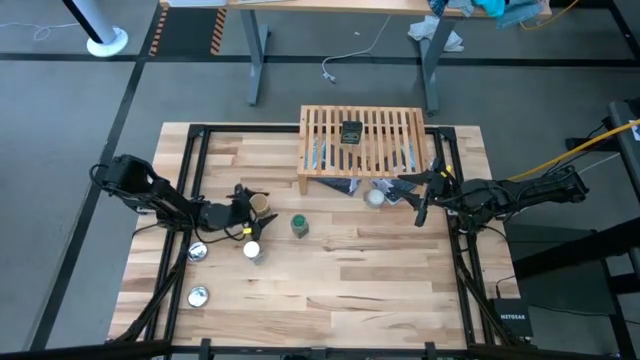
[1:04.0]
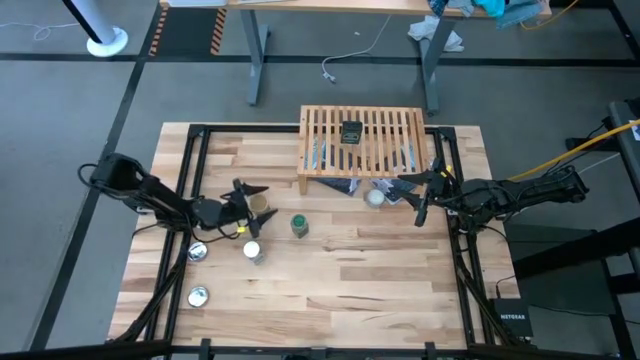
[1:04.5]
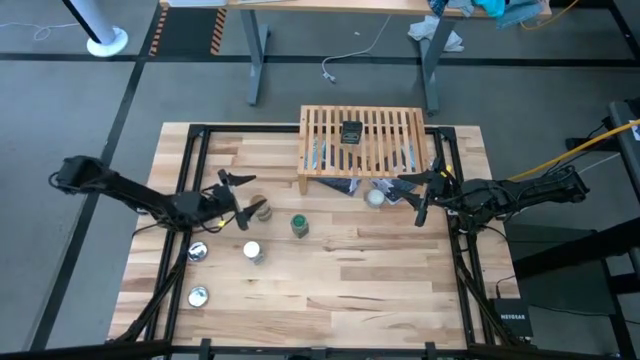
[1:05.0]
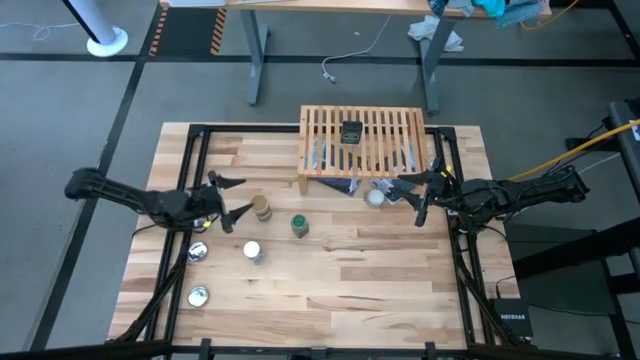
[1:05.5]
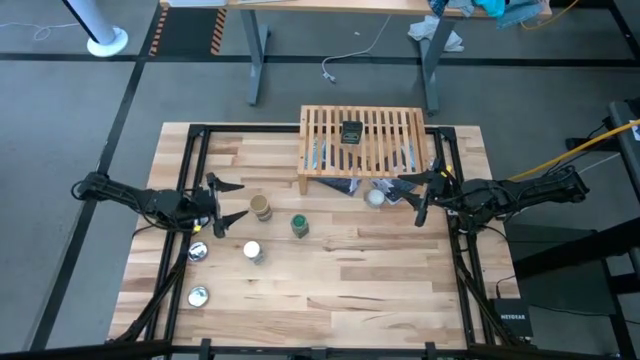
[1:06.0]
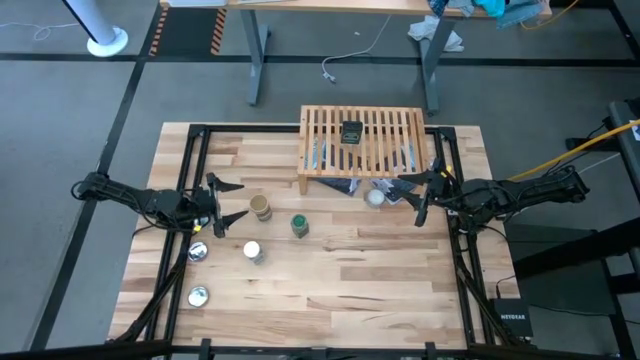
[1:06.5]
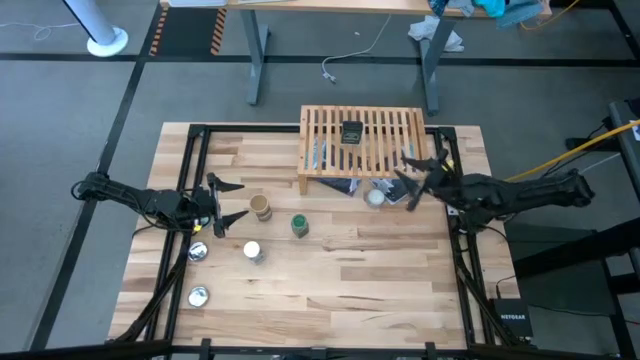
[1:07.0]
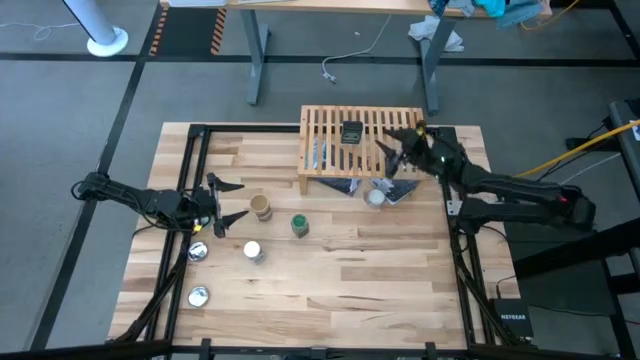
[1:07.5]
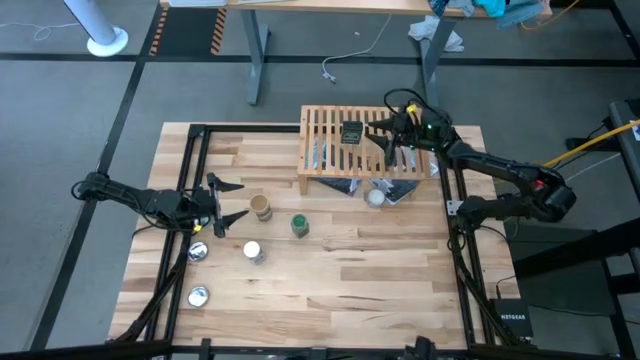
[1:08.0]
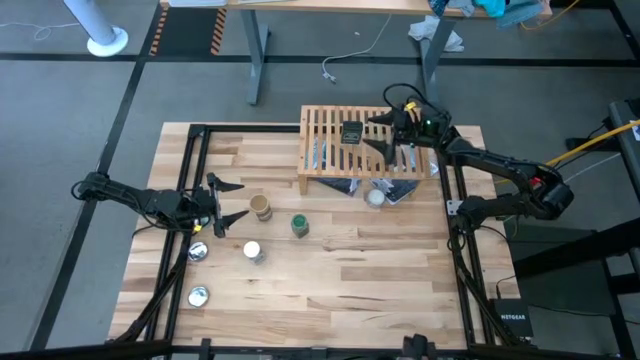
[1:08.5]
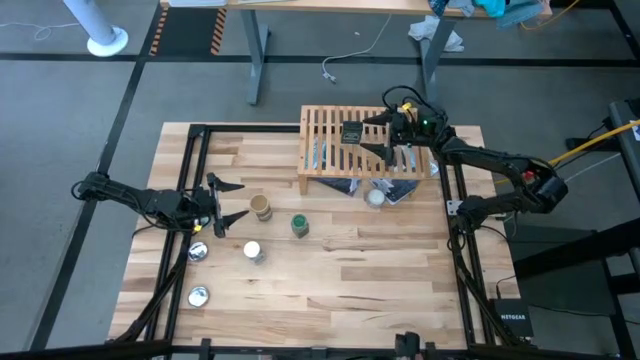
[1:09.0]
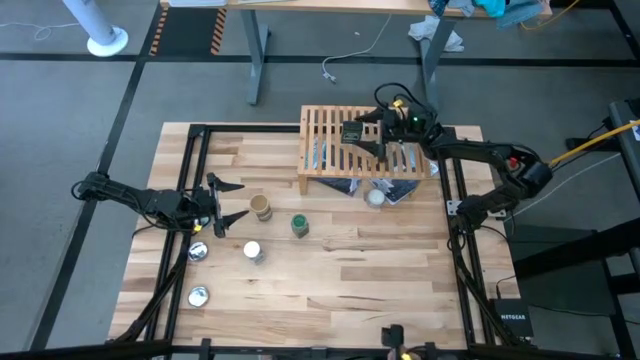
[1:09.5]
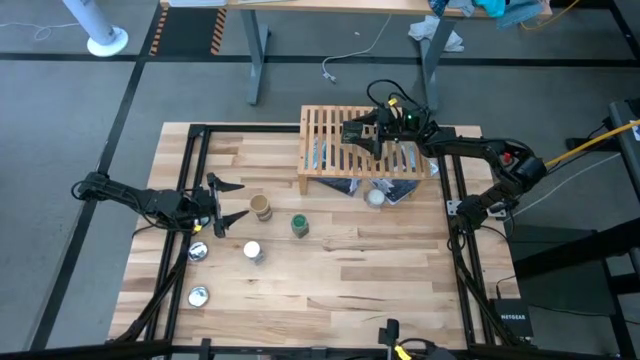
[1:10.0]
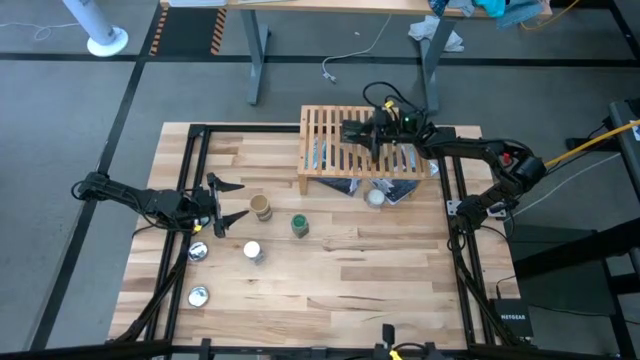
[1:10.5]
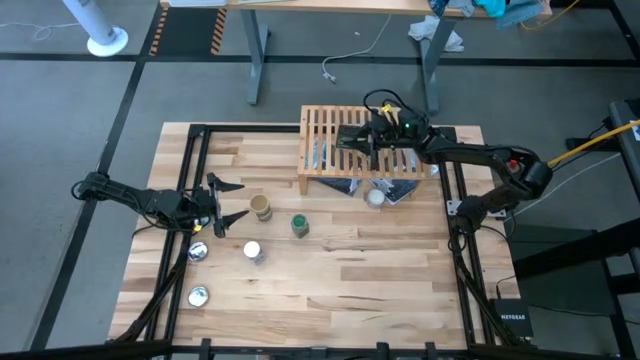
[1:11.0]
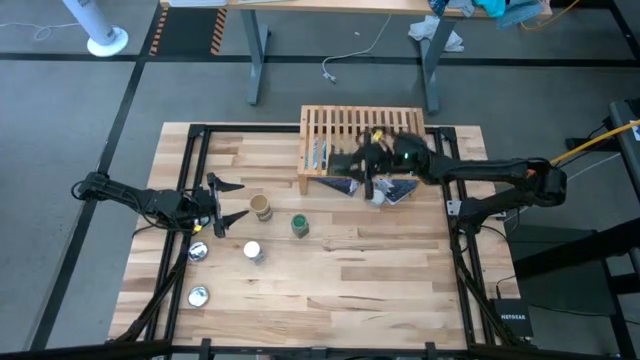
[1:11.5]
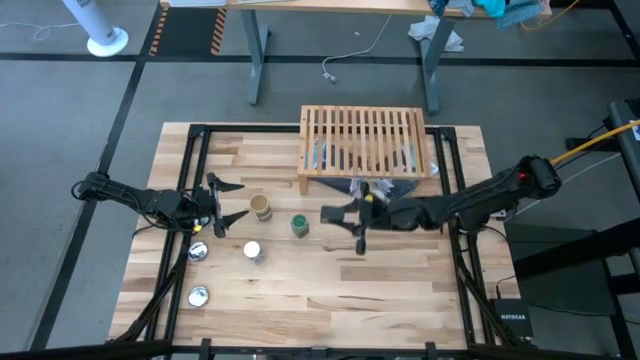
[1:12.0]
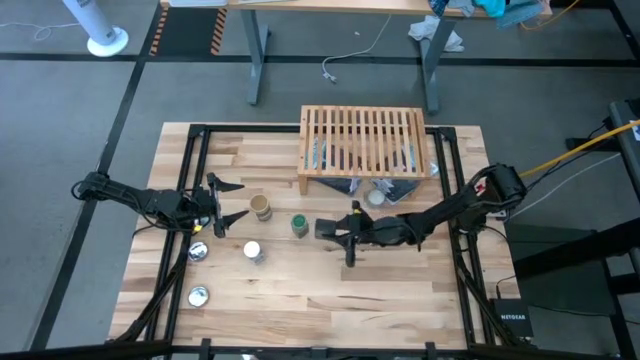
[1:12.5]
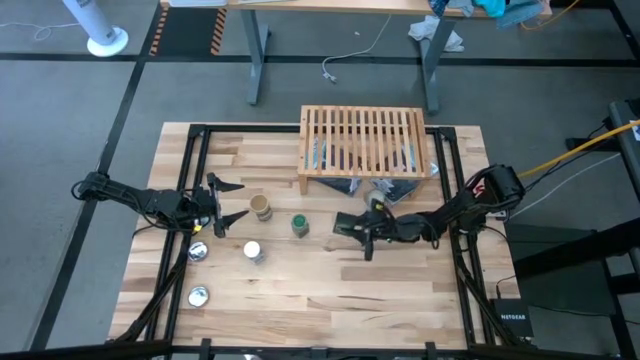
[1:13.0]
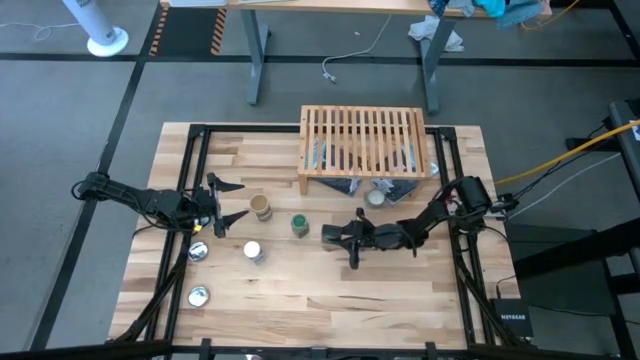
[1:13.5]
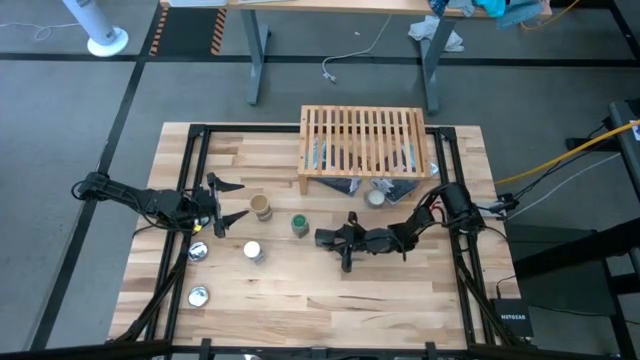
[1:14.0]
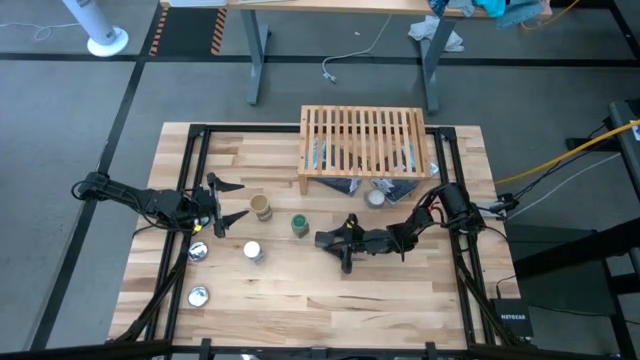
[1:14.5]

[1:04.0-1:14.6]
Task: Shelf spices
Remove the black seasoning can from the shelf

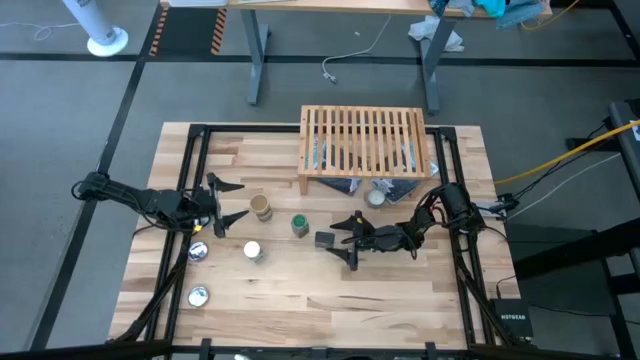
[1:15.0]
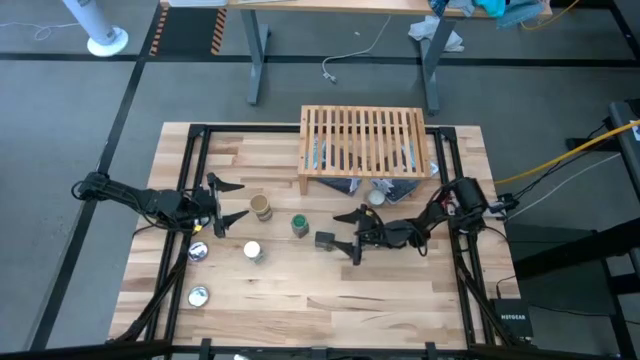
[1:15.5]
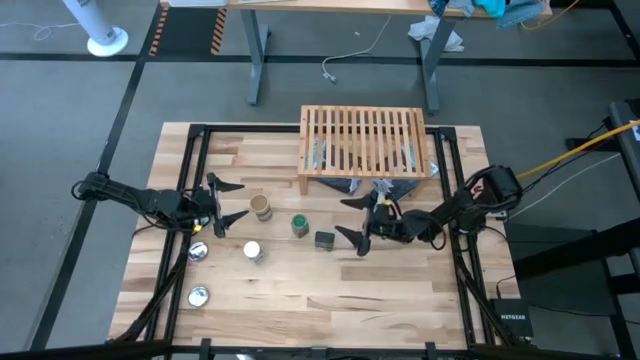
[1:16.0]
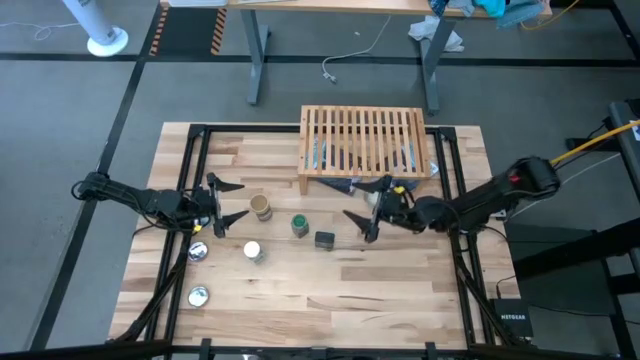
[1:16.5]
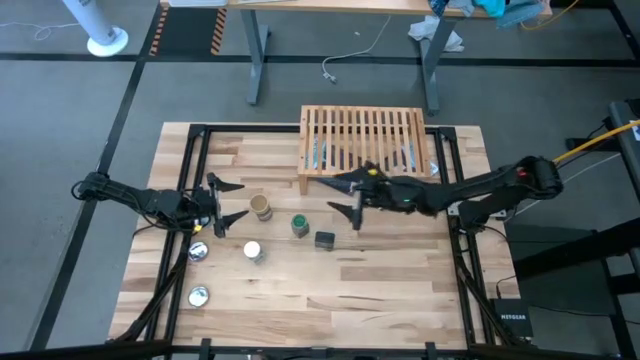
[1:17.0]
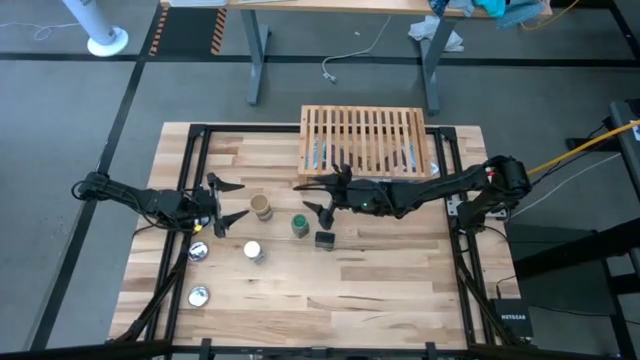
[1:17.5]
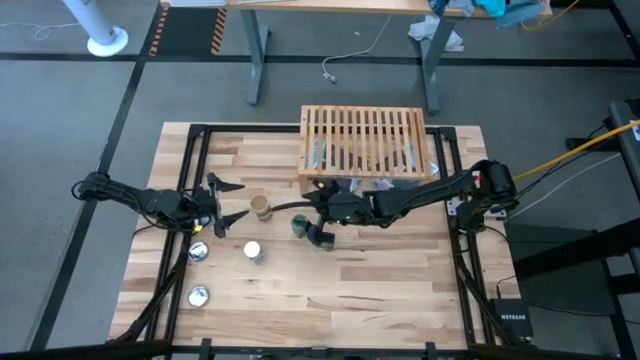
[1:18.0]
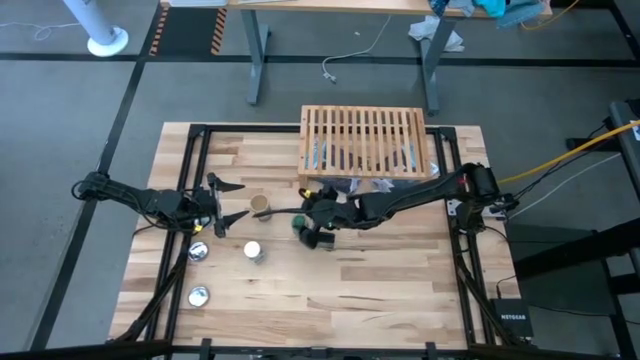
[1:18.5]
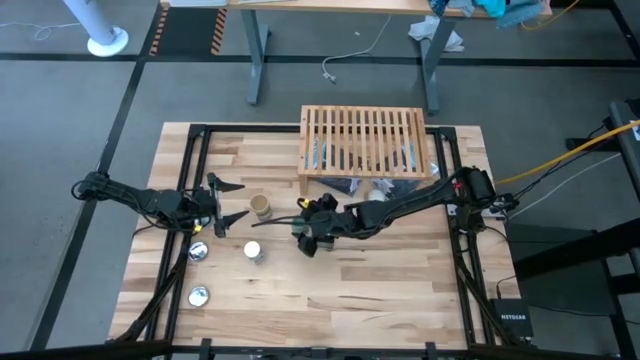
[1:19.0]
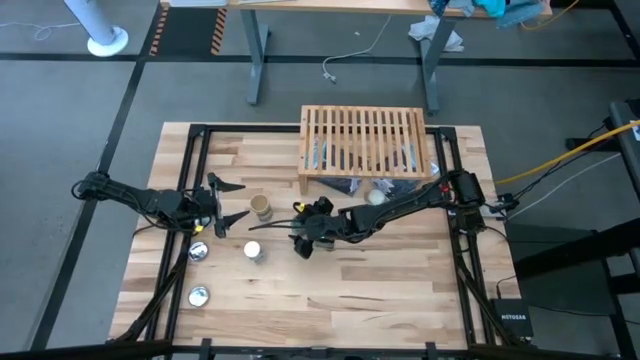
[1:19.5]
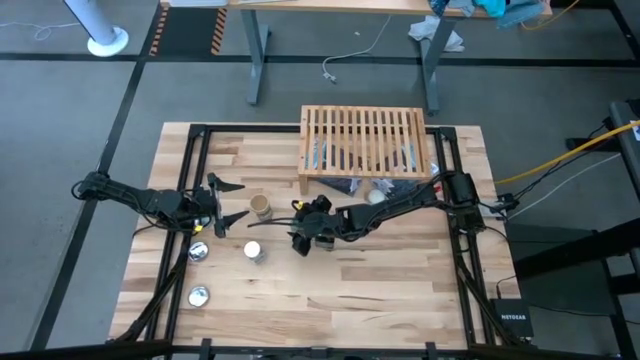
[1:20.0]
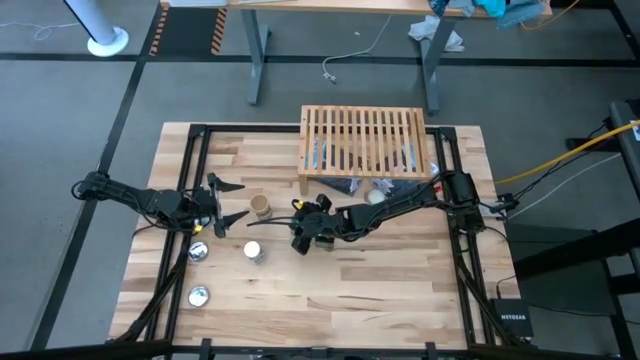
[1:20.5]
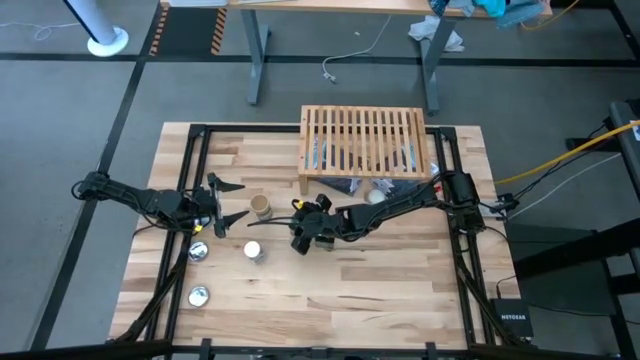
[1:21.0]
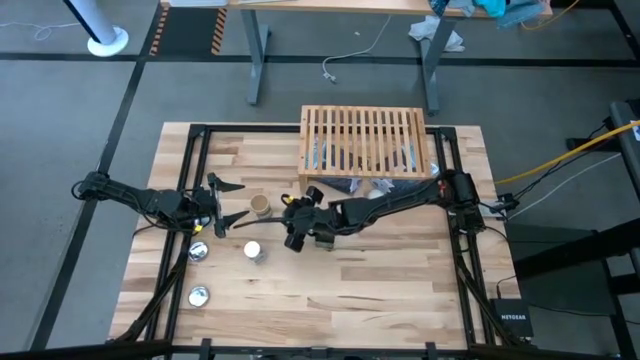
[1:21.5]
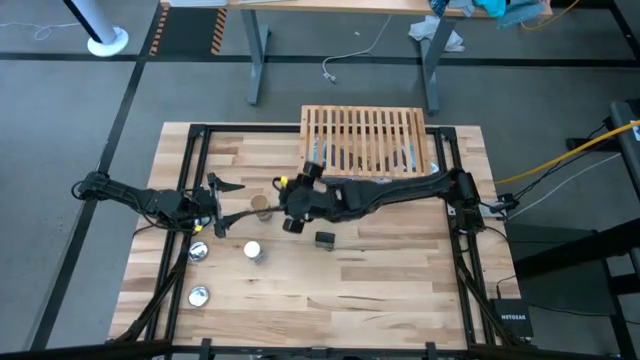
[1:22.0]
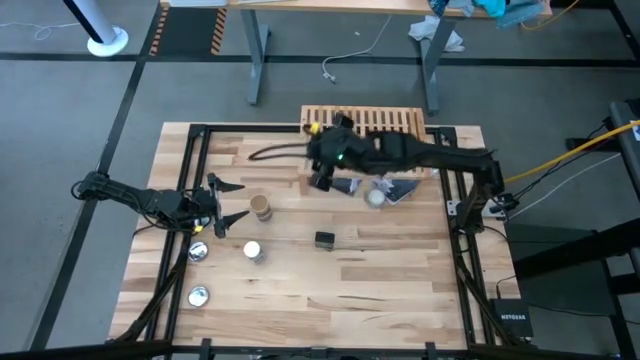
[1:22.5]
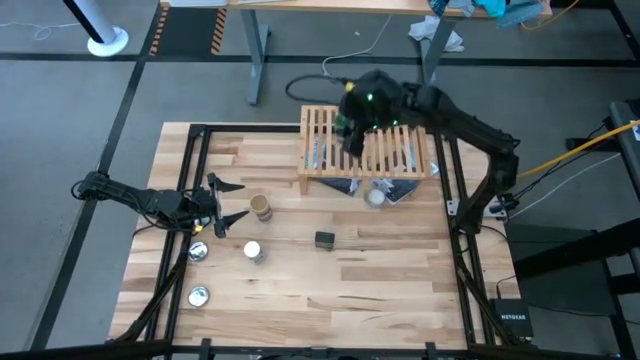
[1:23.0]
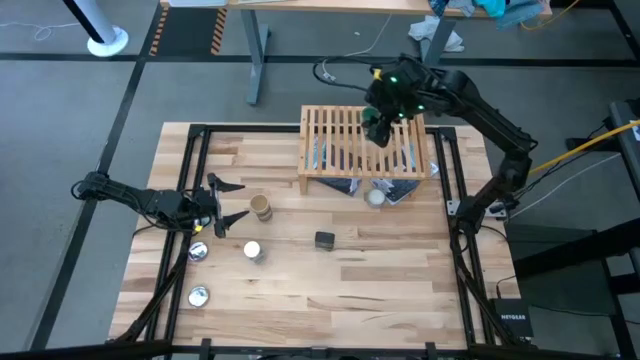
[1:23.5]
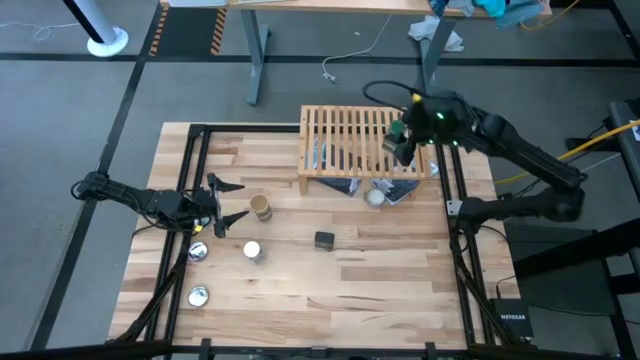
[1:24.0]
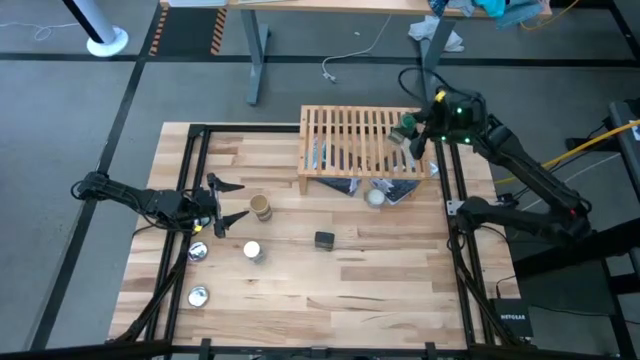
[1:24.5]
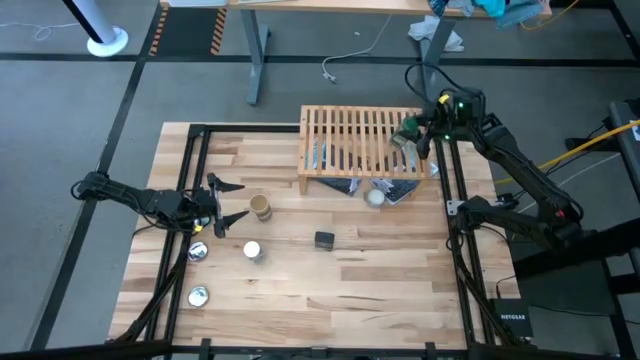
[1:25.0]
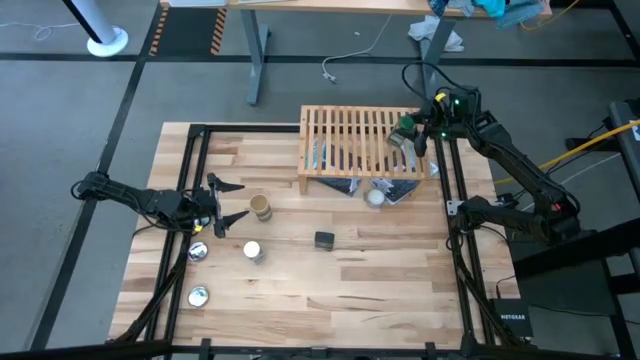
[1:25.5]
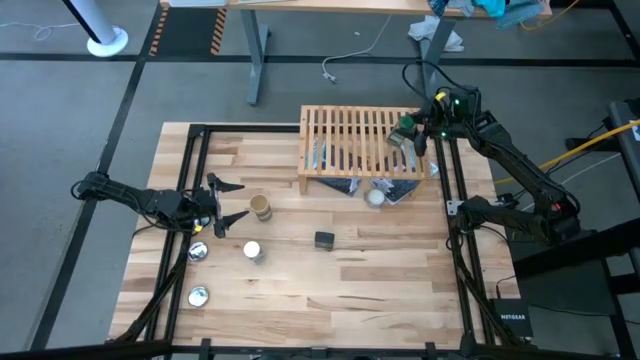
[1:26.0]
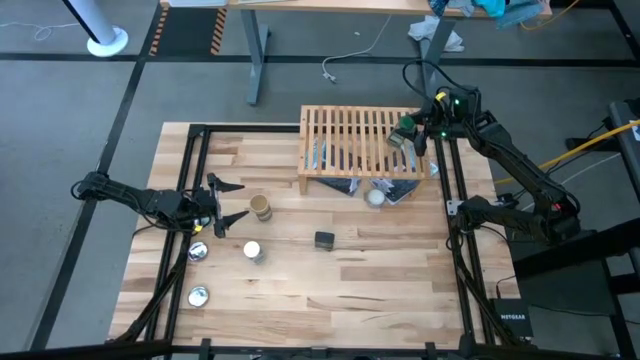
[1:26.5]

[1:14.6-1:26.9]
Put the green seasoning bottle on the shelf
